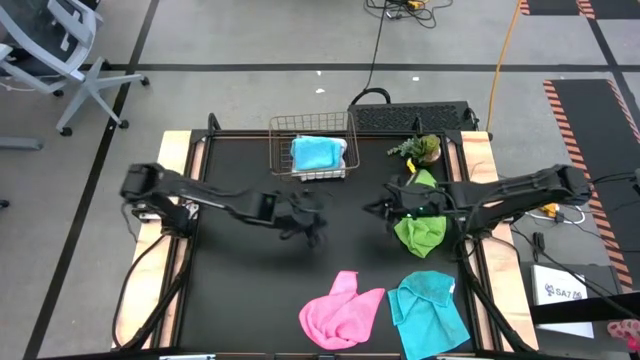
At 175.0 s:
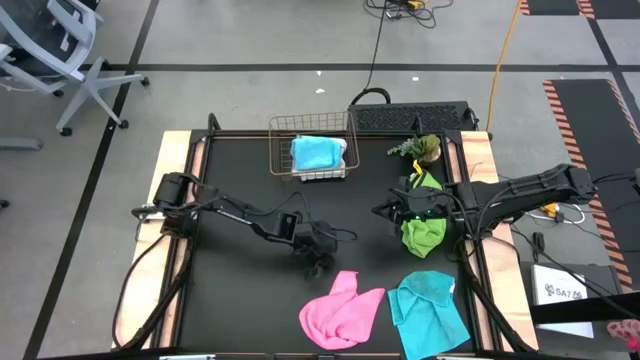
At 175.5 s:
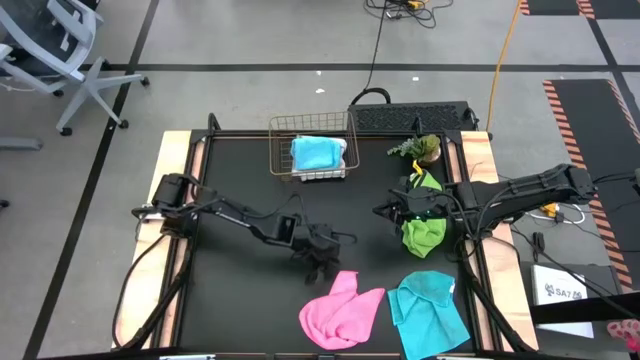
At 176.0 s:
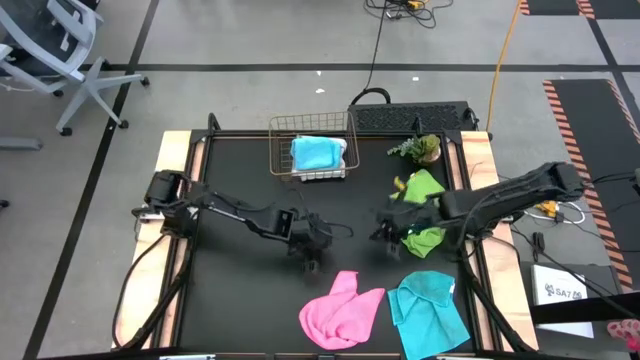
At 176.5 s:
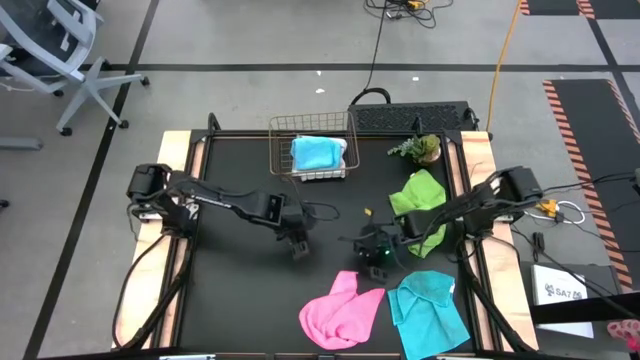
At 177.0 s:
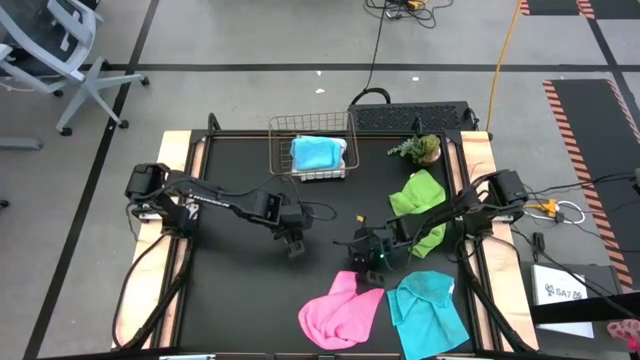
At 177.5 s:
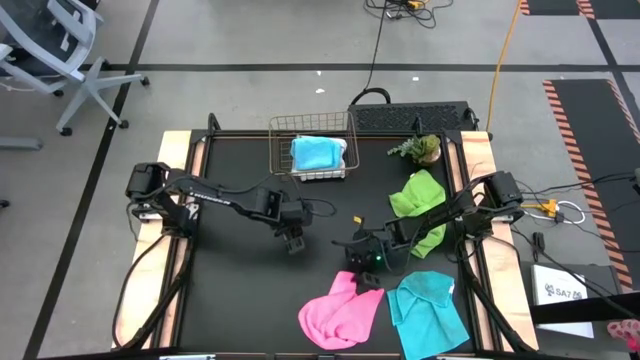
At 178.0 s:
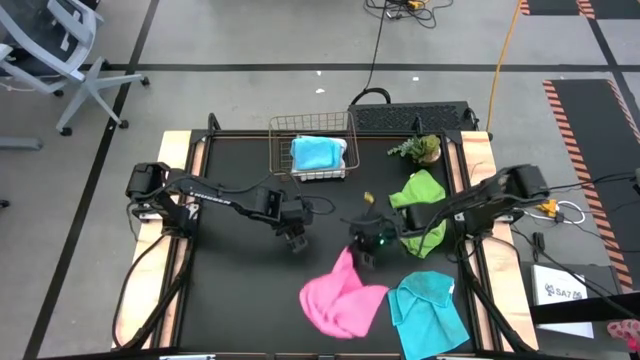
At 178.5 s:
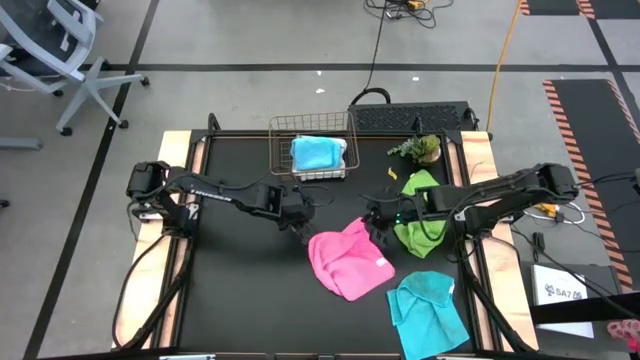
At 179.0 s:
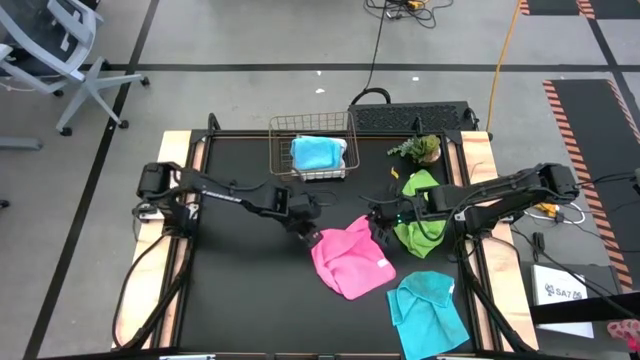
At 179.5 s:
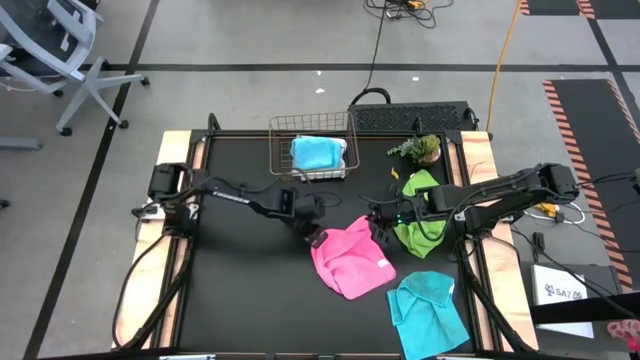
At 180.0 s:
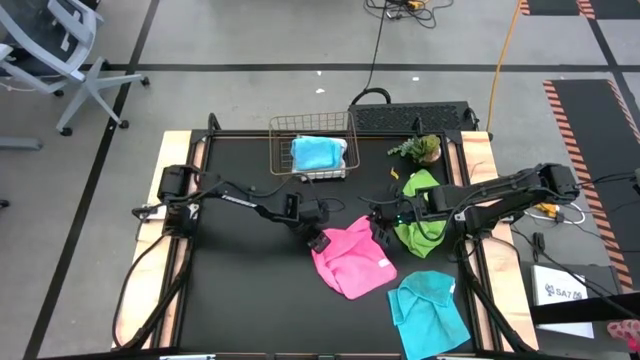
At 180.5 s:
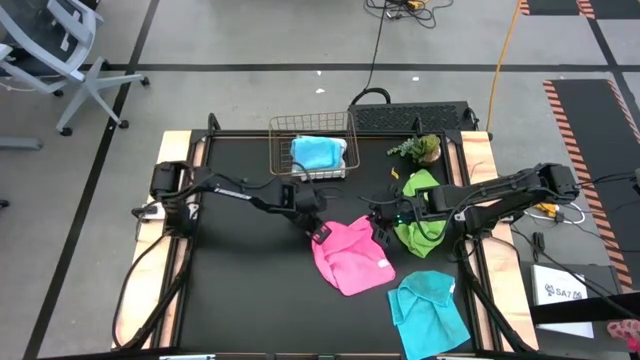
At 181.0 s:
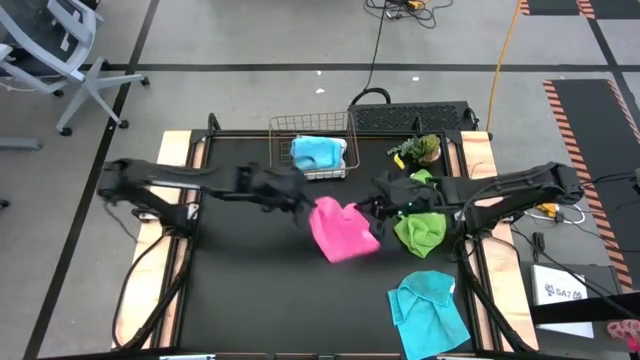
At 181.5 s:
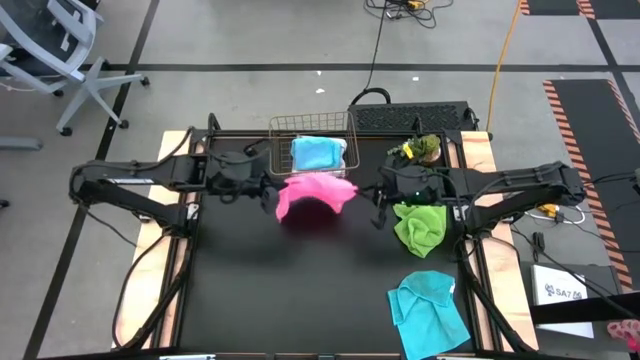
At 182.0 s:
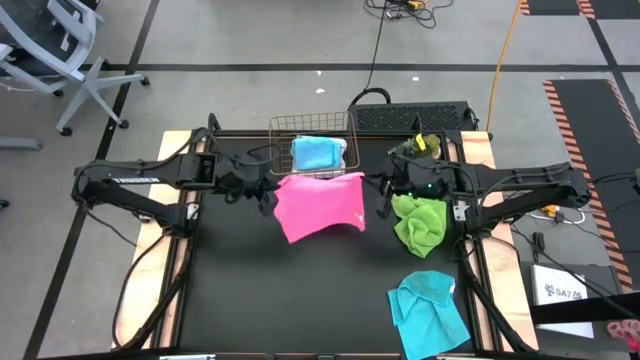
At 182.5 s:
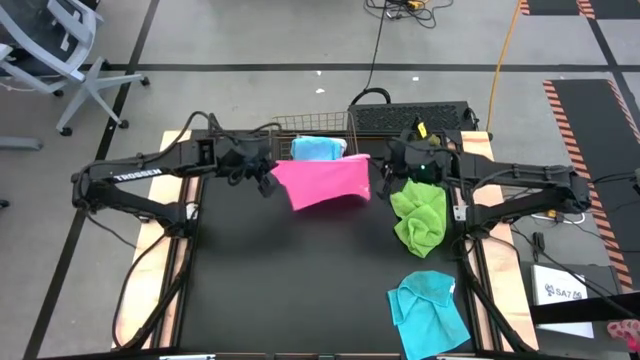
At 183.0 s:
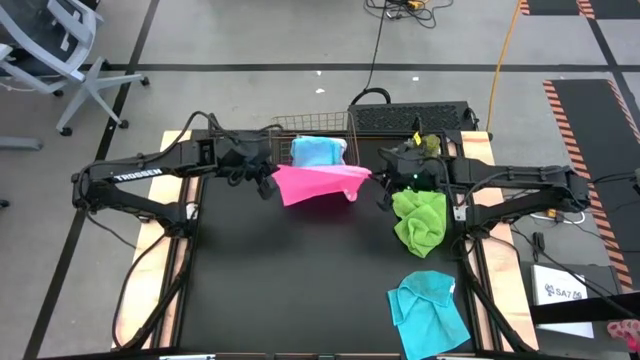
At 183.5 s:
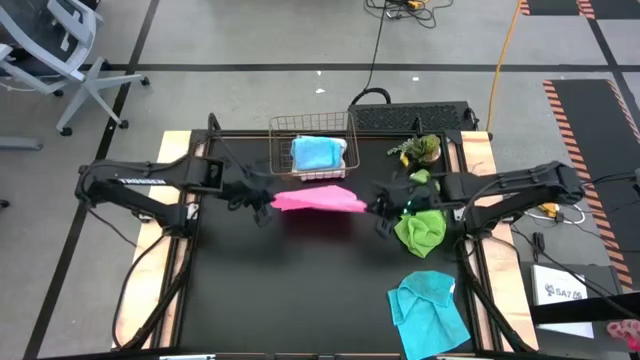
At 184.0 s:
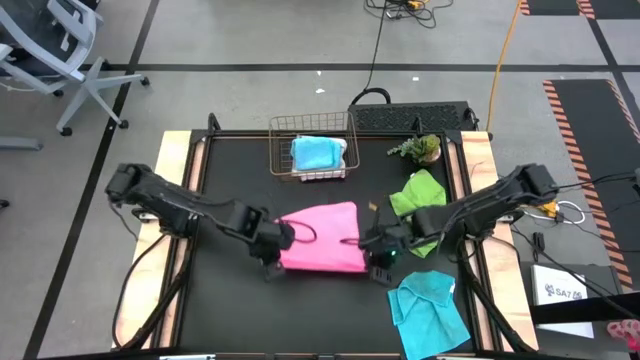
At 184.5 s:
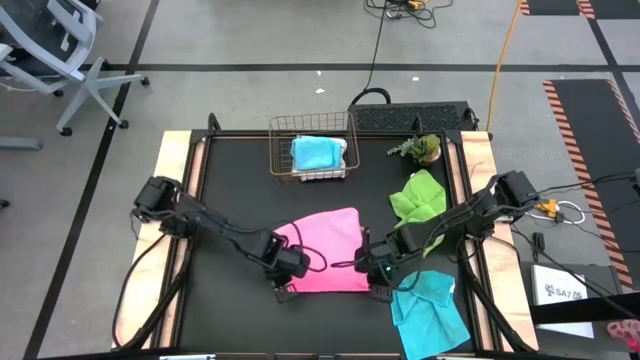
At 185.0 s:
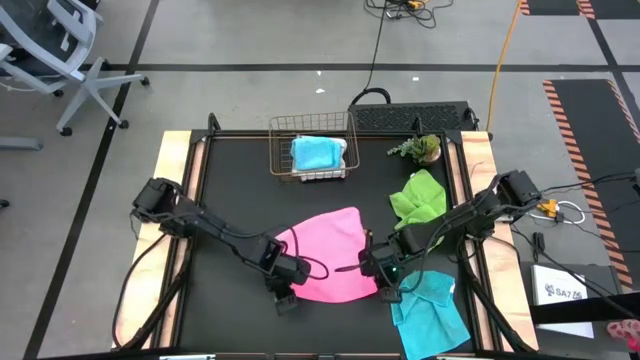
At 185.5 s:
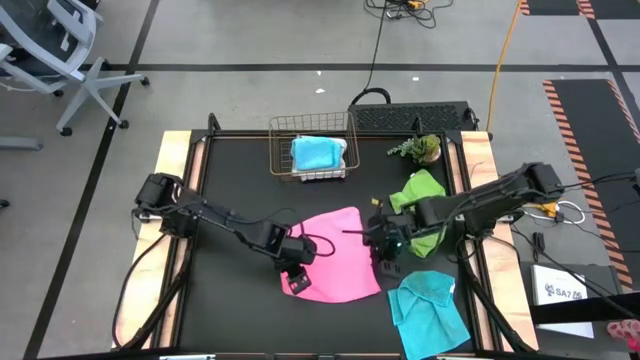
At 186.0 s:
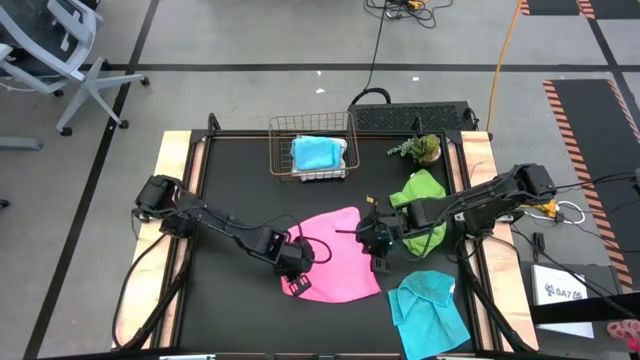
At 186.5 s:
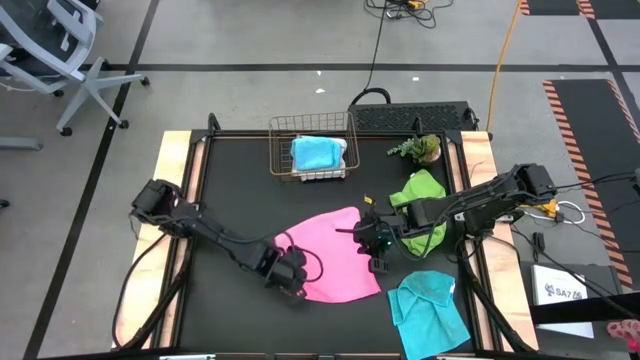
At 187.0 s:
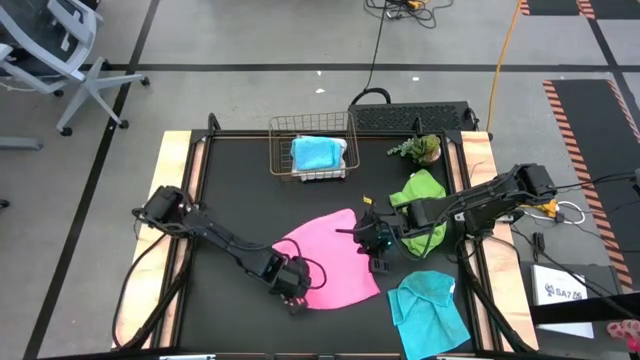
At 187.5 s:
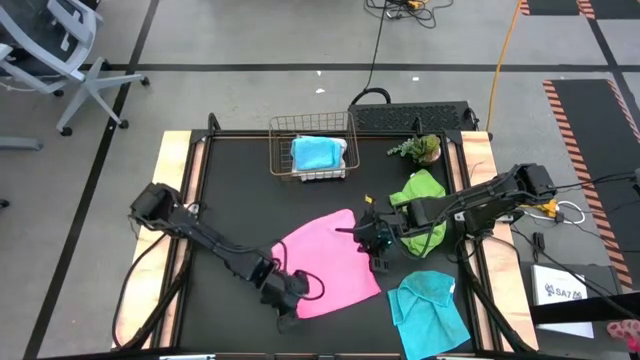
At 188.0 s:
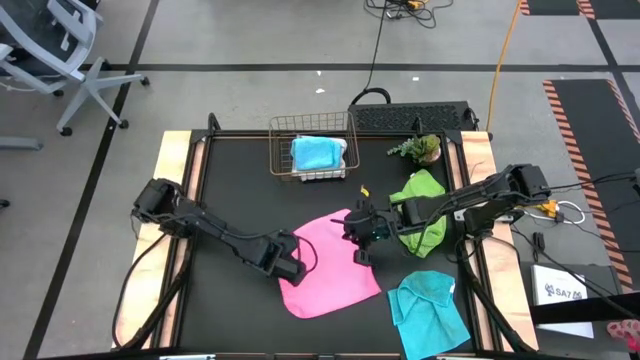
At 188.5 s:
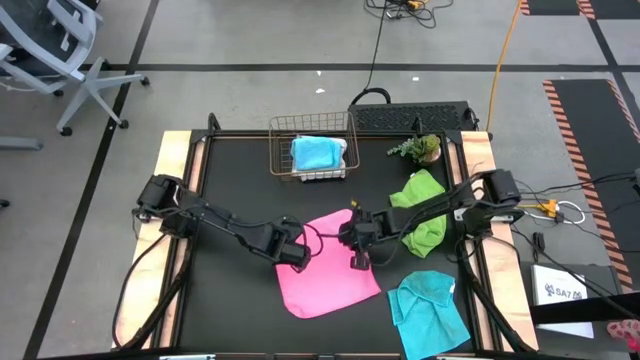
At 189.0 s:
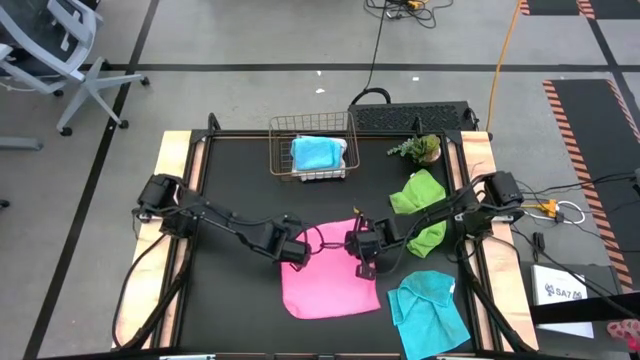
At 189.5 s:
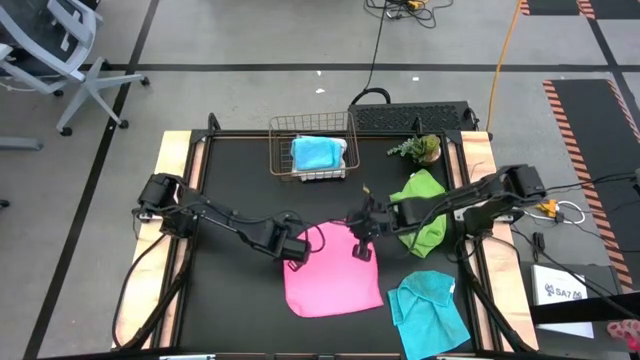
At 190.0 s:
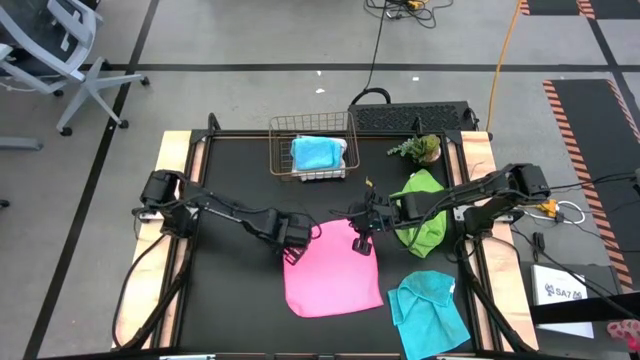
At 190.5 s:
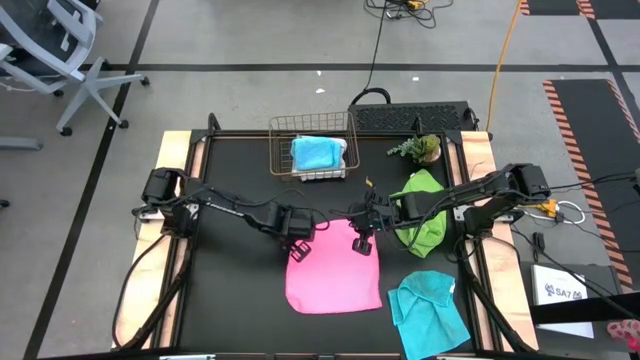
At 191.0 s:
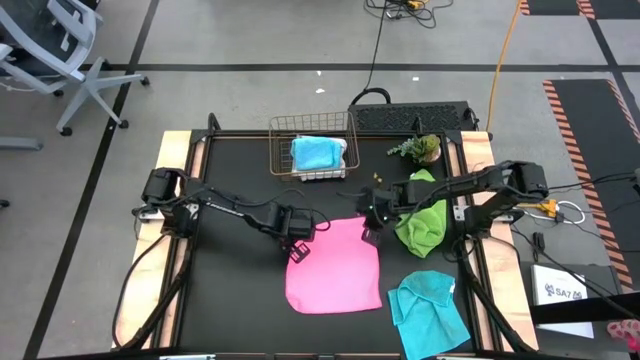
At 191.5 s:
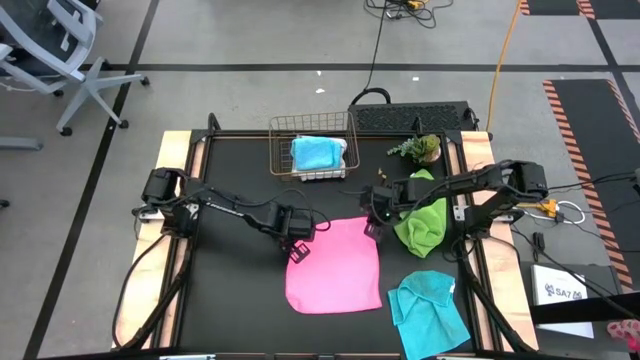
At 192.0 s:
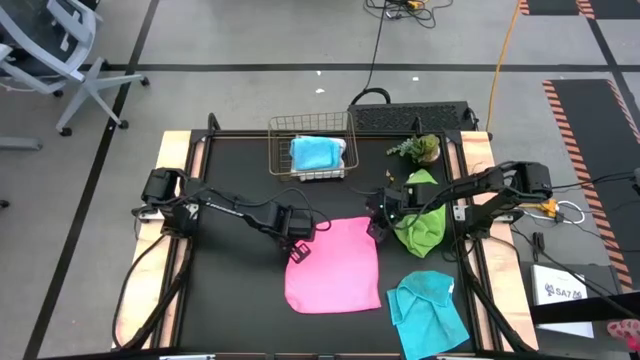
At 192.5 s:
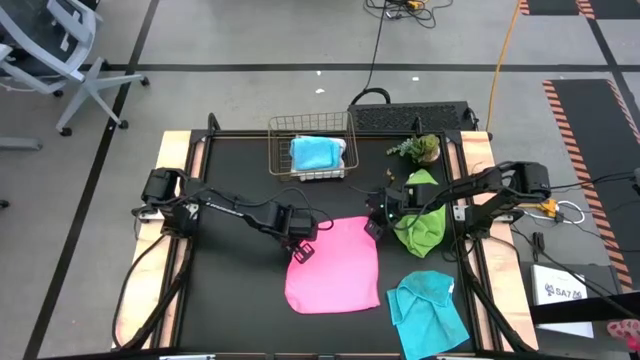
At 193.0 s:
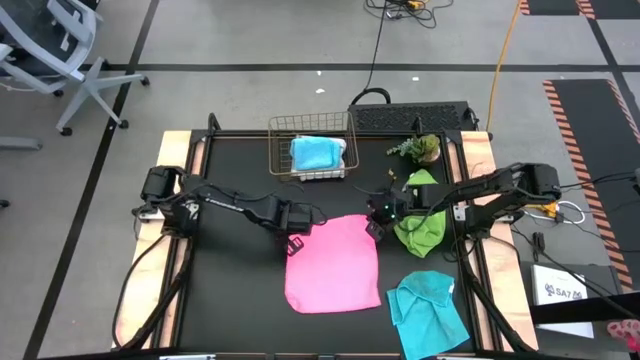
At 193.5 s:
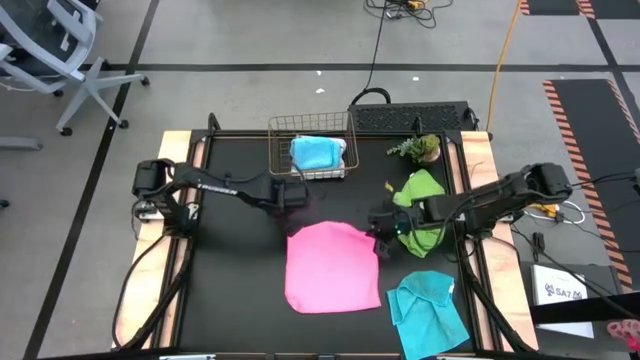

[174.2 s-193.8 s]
Task: Fold microfiber towels
Fold the pink microfiber cloth
